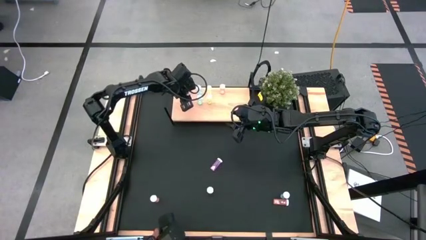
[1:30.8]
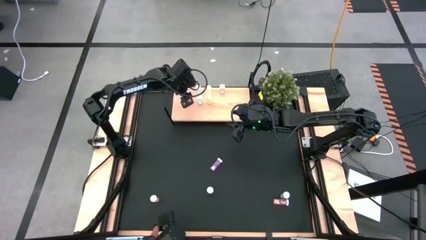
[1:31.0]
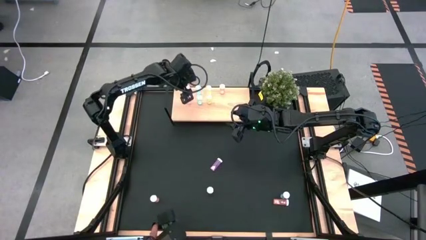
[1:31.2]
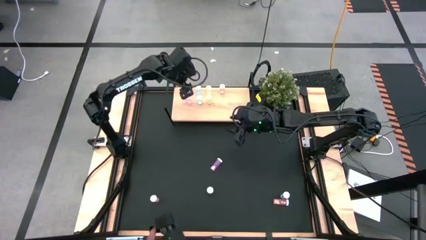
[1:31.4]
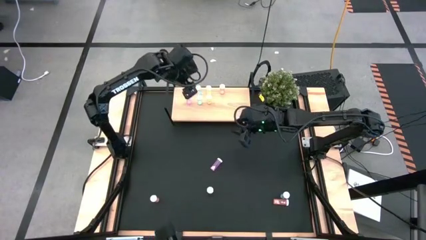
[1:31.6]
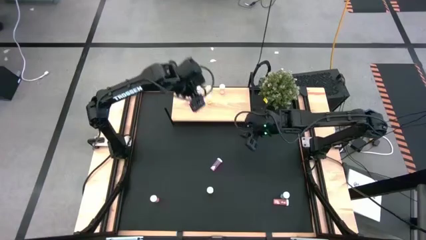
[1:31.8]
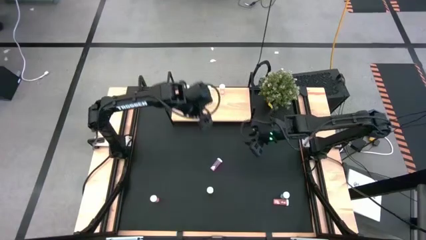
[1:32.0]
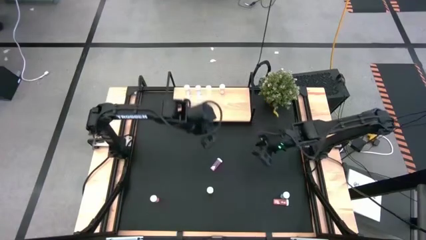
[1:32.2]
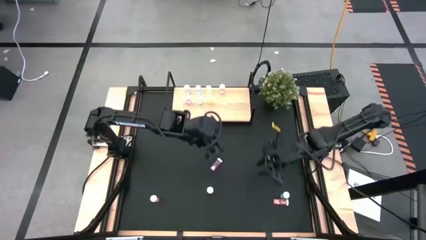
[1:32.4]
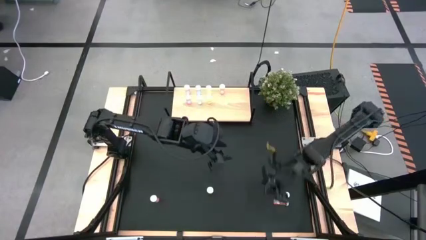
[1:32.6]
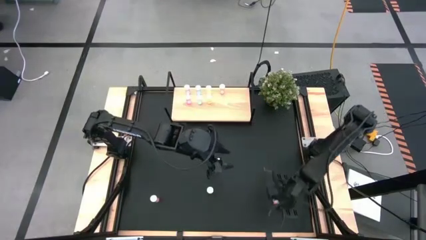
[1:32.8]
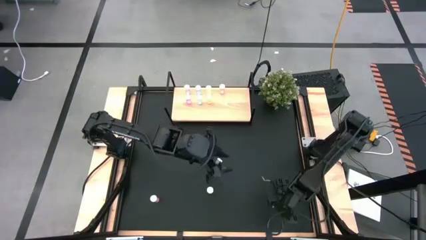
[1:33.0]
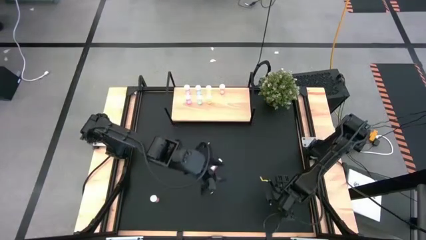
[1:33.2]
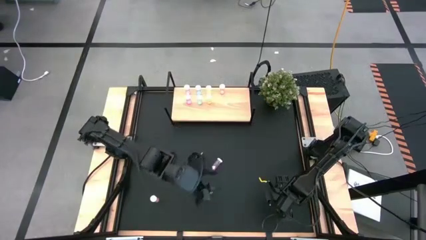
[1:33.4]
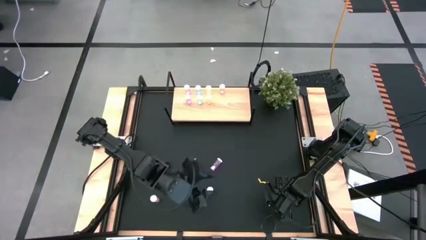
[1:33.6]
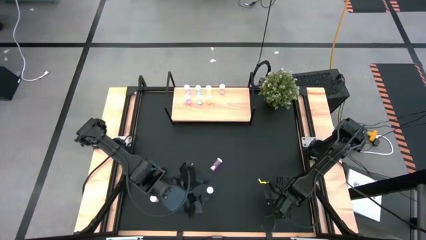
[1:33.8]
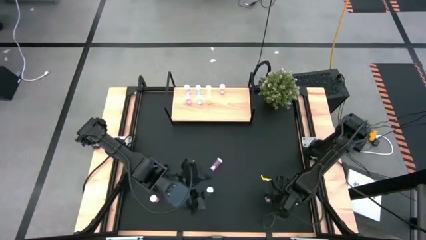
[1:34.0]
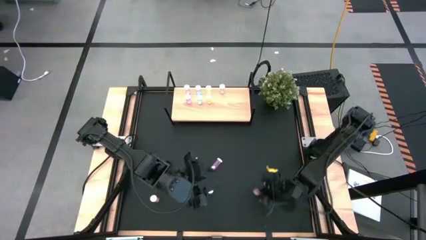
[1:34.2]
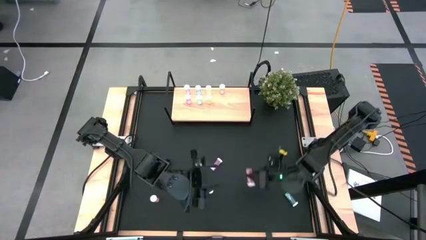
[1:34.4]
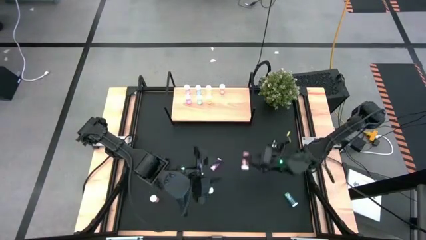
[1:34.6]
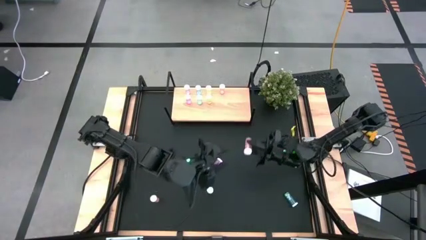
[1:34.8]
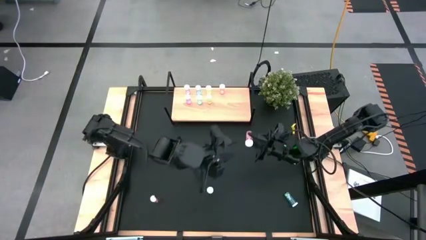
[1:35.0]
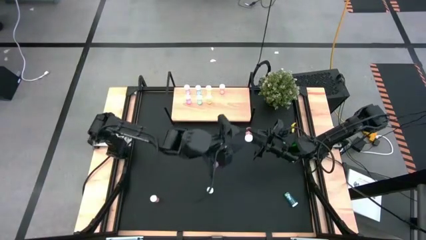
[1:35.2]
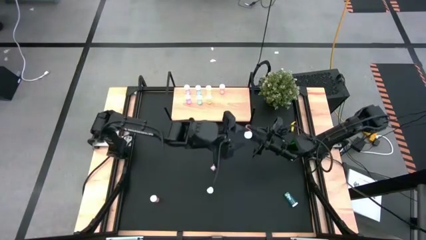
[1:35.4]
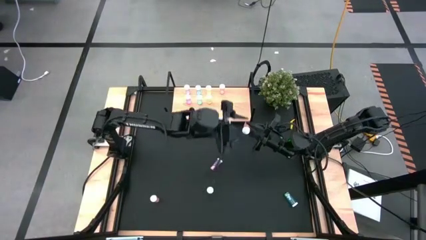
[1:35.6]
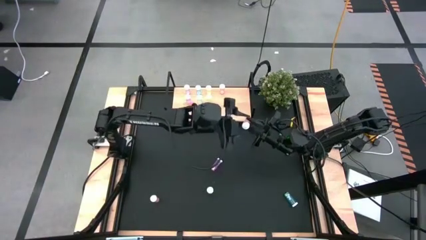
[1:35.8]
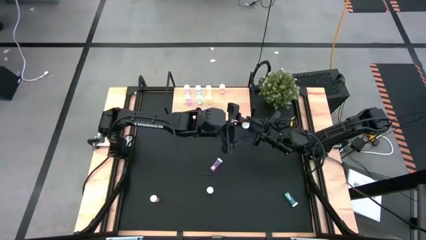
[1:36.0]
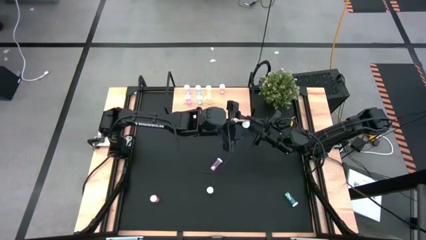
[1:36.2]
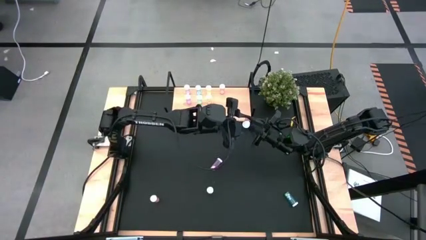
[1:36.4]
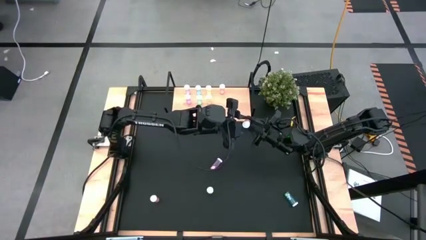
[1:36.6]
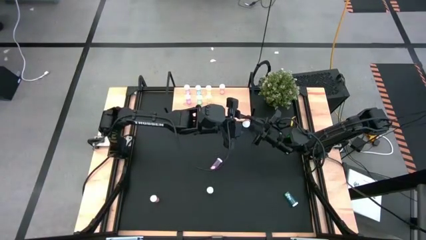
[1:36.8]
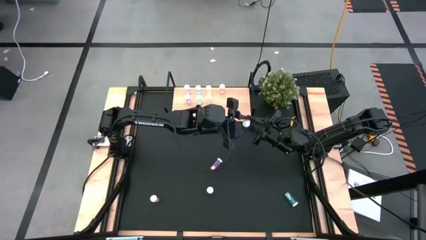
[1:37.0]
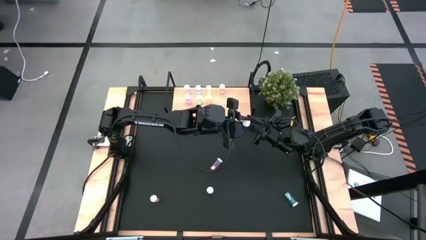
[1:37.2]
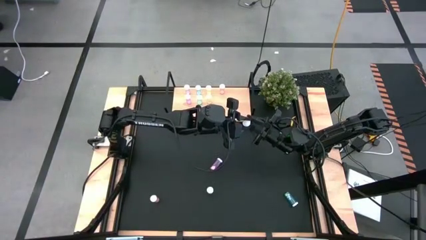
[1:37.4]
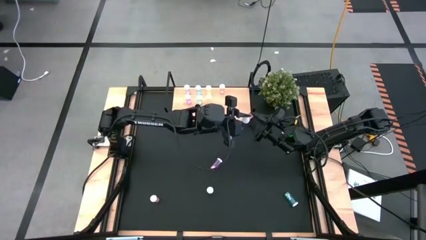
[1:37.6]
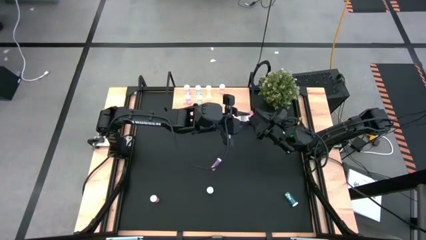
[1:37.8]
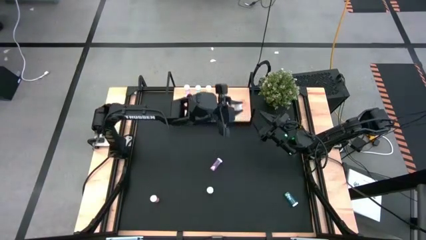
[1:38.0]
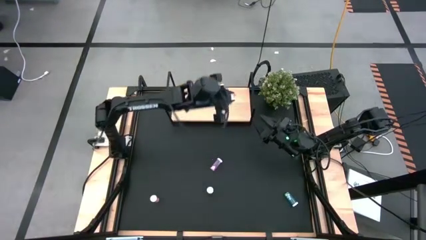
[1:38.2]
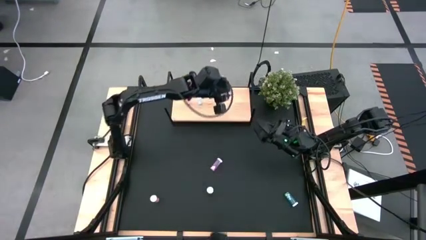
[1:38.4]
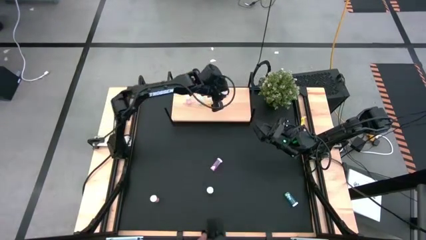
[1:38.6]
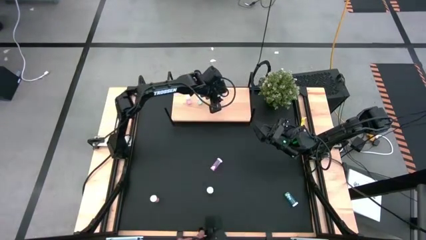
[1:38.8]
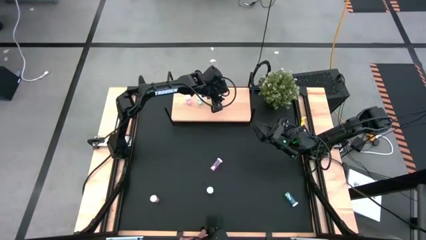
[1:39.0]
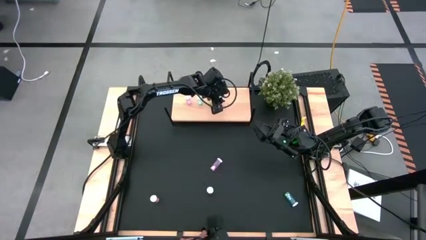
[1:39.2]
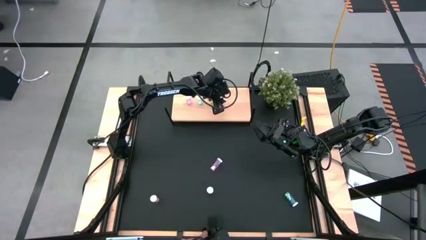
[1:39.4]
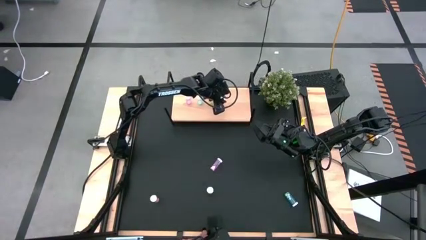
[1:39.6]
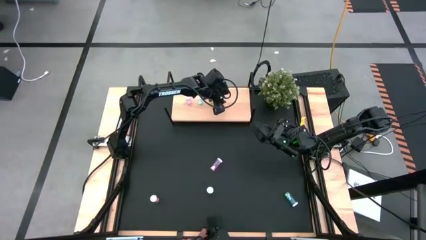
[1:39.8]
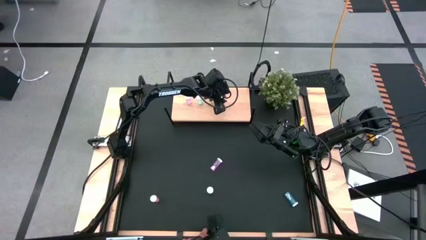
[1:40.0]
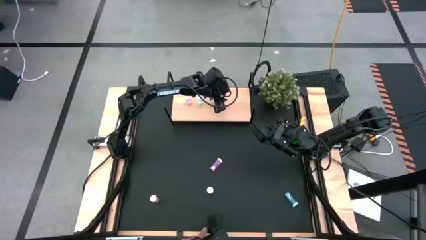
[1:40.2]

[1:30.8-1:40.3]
Task: Pick and place medicine bottles onto shelf by color
Put the right red medicine bottle on the shelf aligned with the other red medicine bottle

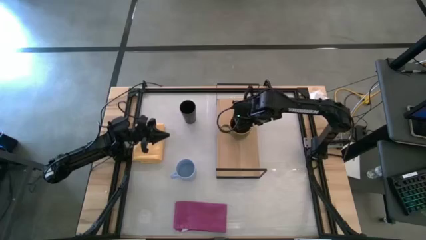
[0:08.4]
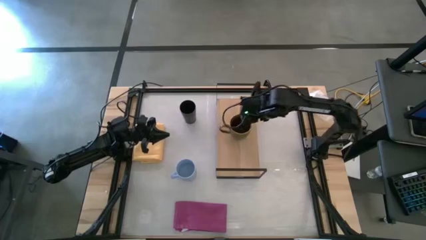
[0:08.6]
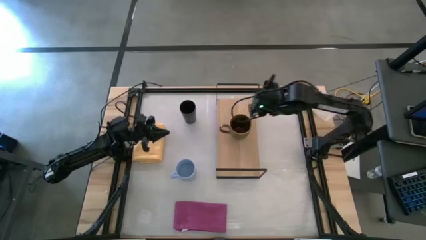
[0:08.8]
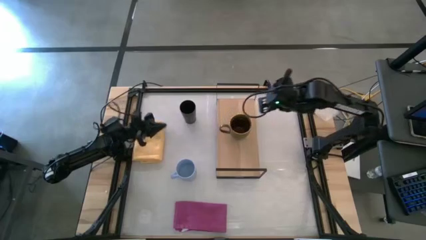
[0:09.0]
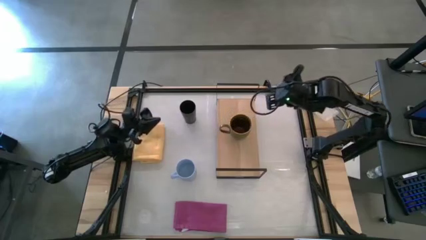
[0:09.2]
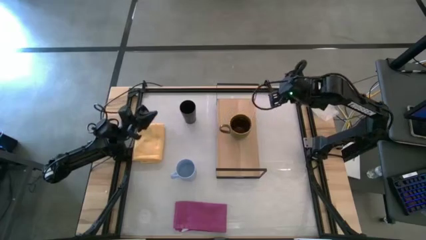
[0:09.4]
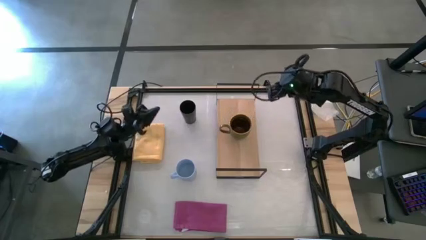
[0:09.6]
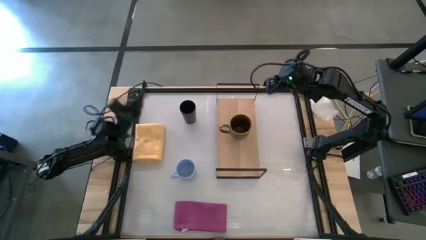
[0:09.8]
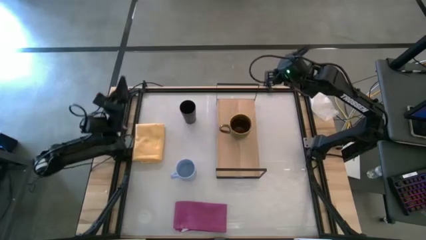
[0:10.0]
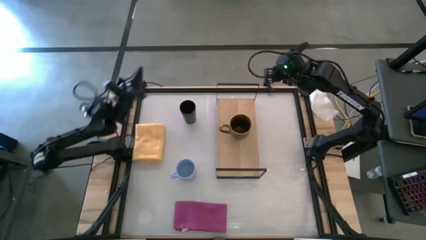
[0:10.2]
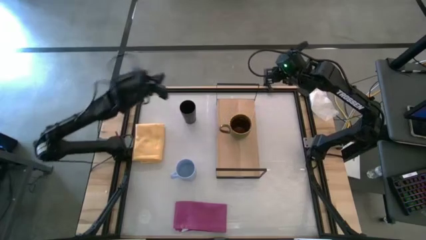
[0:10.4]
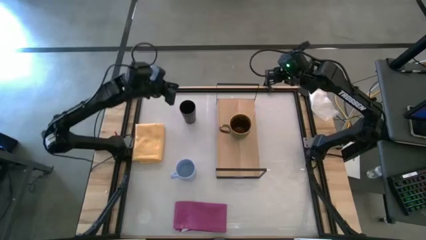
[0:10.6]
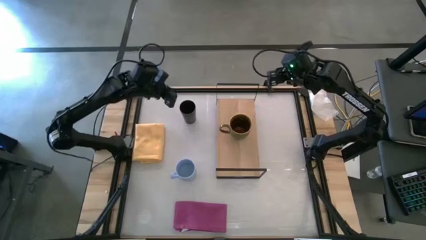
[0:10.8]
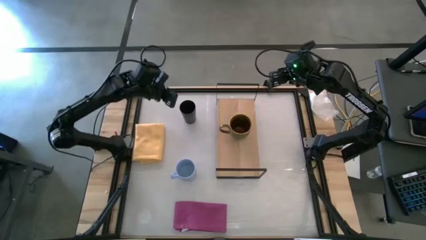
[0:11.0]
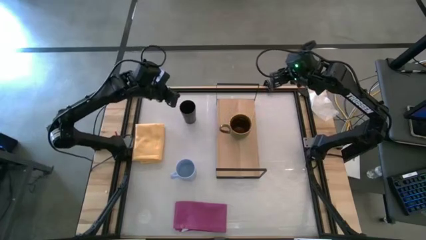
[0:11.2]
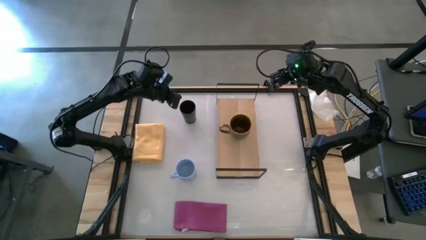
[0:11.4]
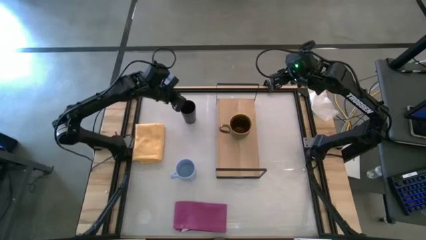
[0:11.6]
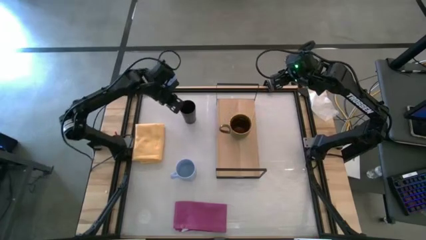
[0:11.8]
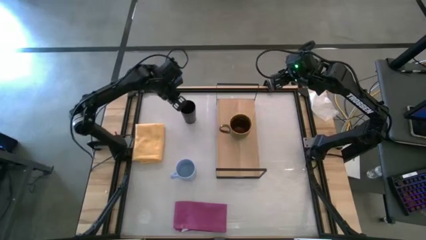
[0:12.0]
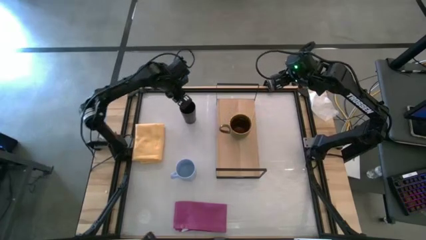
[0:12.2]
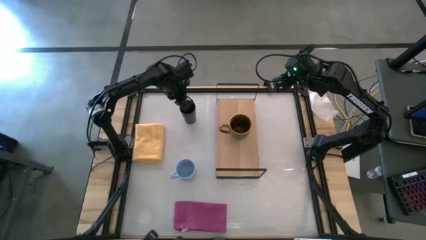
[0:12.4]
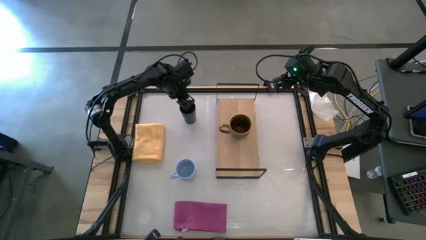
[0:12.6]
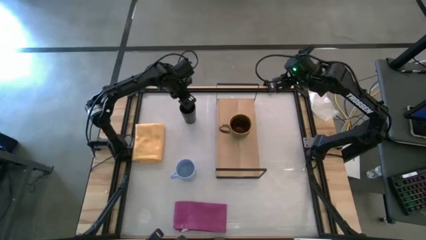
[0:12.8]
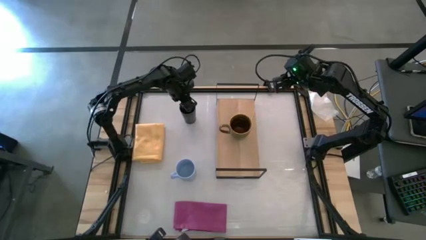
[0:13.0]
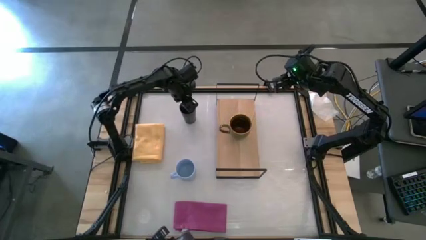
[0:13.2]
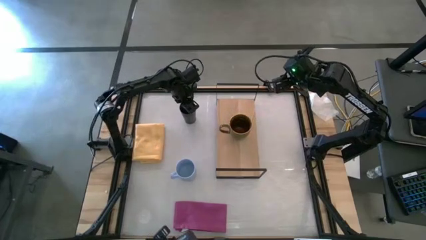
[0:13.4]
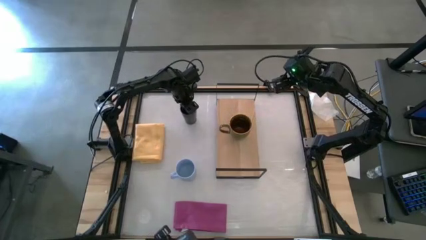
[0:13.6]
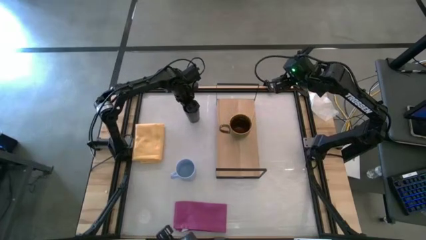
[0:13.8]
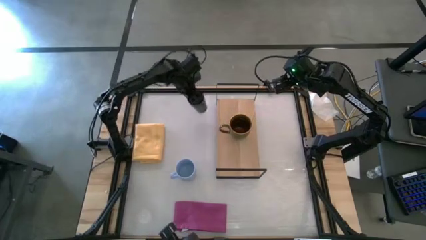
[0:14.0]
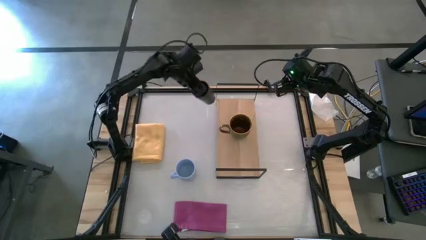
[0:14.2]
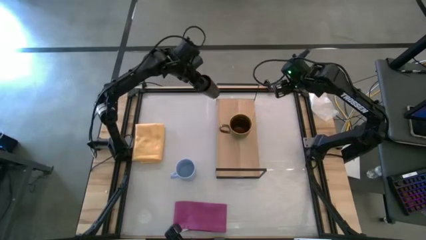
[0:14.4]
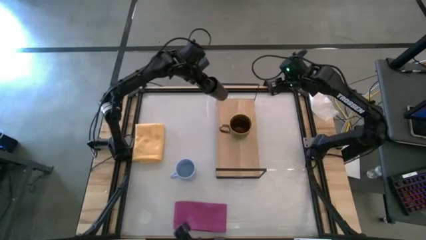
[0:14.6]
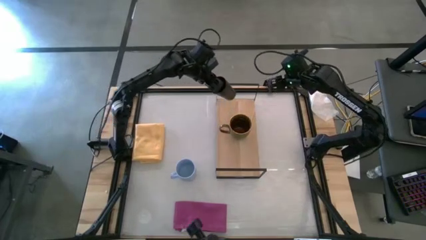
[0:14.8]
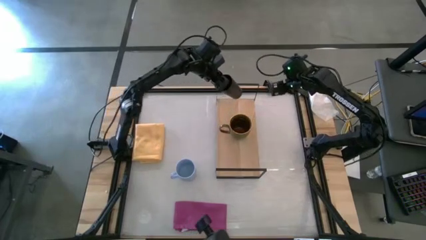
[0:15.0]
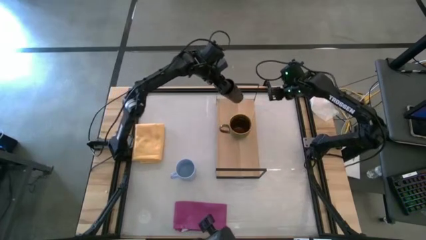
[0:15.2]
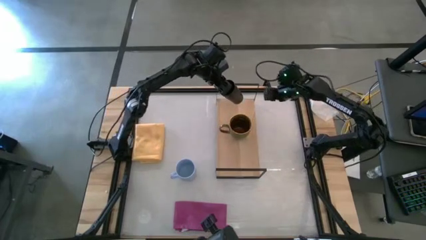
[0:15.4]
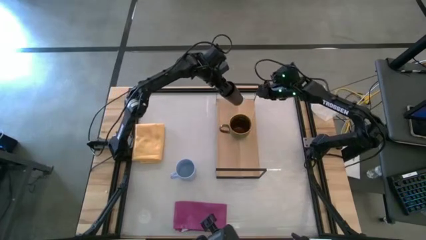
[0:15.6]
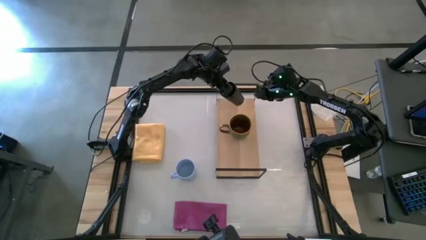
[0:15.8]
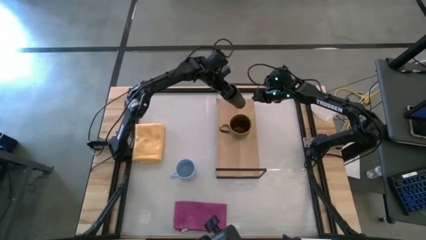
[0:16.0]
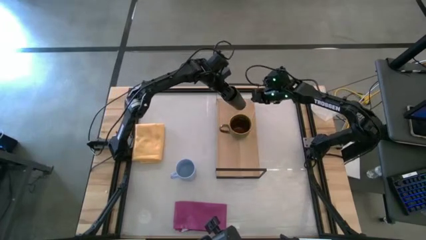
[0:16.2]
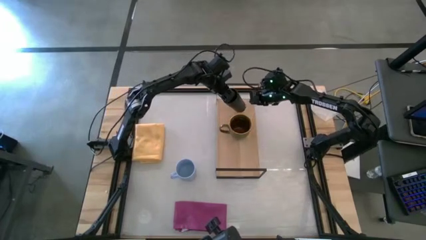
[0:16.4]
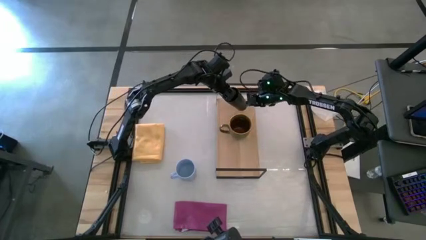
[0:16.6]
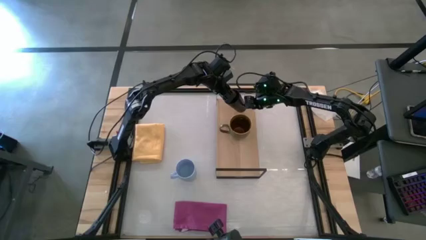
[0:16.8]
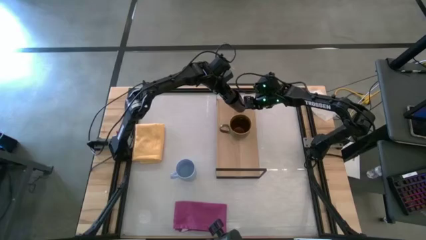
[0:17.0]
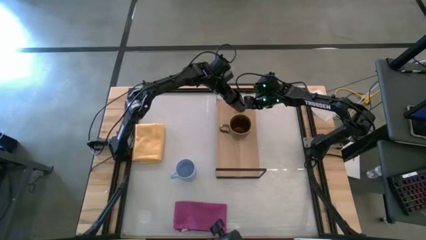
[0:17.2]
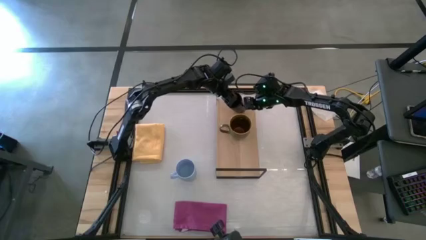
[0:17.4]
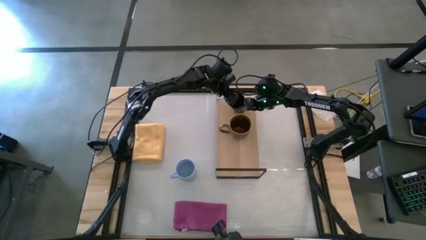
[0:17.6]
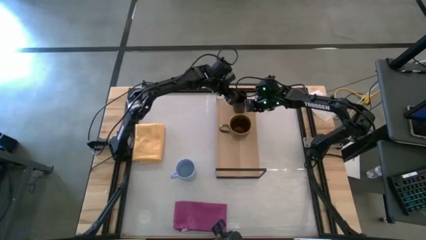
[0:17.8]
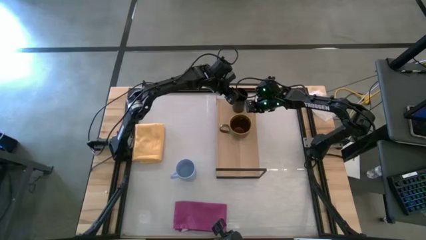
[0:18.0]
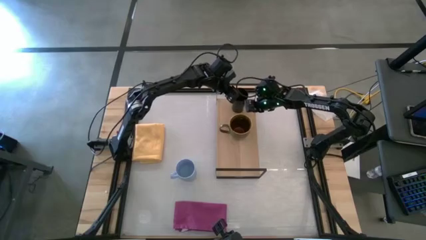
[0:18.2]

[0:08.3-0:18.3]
Task: Stack small to large cups/mugs on shelf
Put the black cup on the shelf
